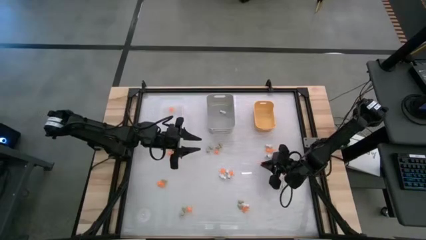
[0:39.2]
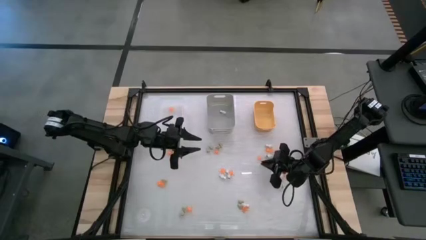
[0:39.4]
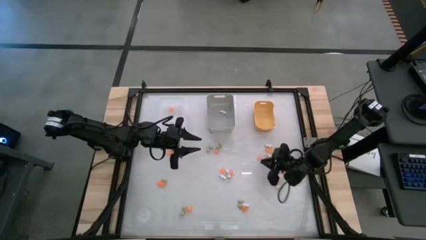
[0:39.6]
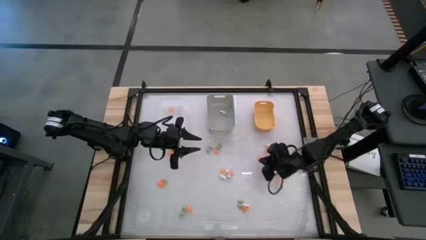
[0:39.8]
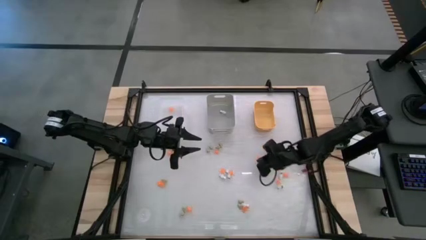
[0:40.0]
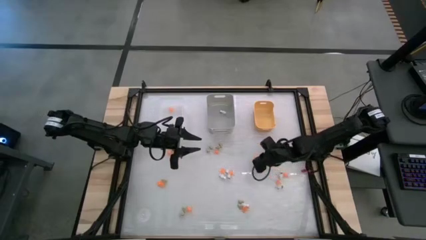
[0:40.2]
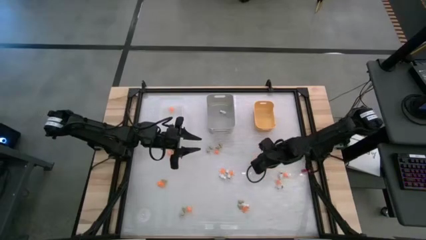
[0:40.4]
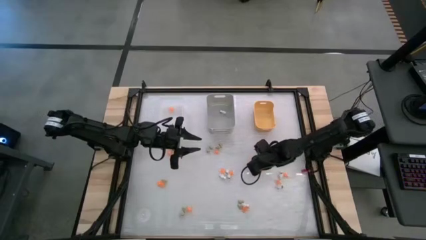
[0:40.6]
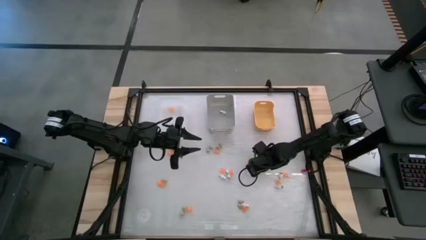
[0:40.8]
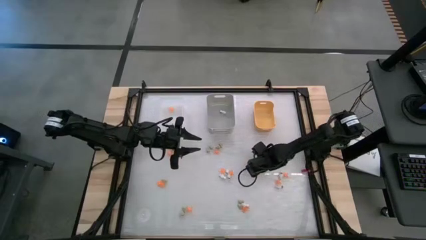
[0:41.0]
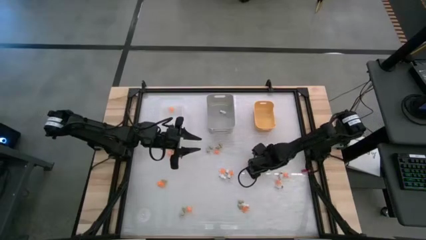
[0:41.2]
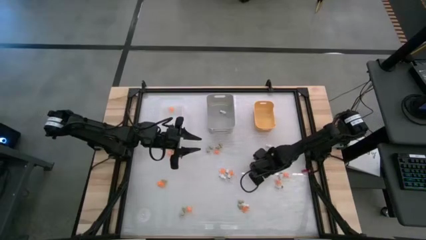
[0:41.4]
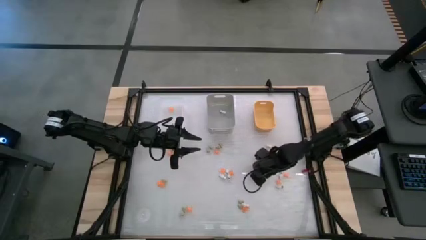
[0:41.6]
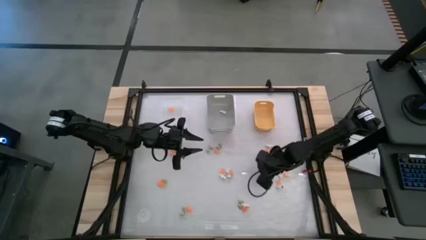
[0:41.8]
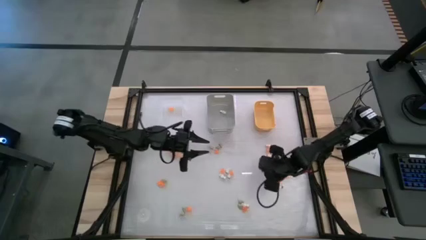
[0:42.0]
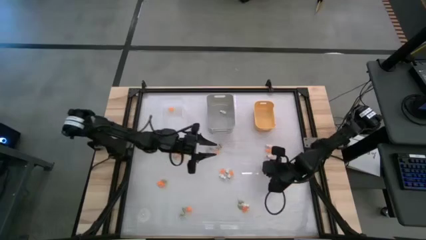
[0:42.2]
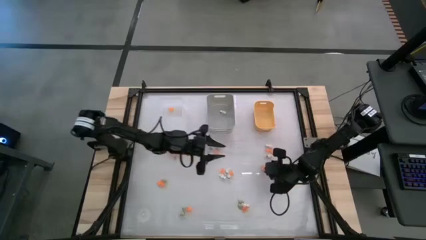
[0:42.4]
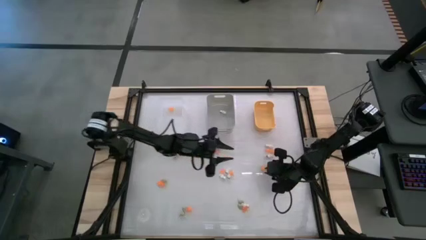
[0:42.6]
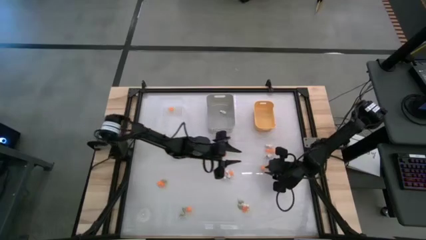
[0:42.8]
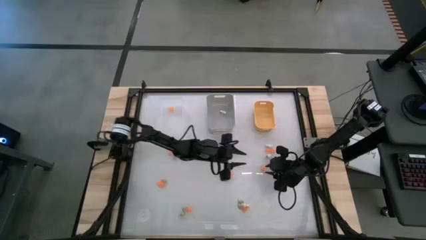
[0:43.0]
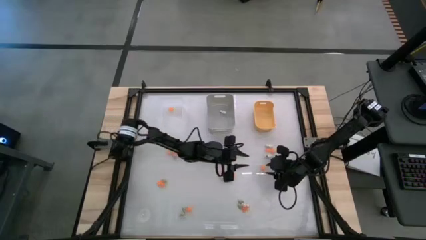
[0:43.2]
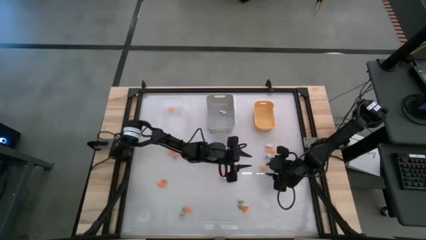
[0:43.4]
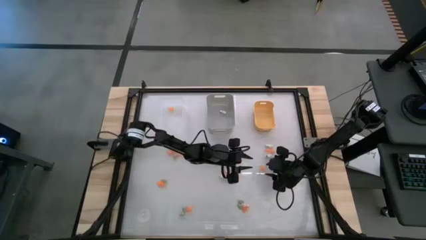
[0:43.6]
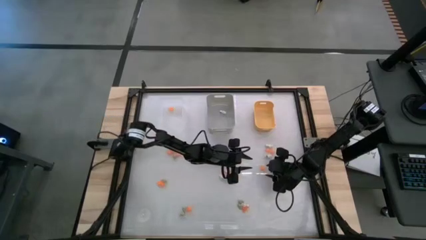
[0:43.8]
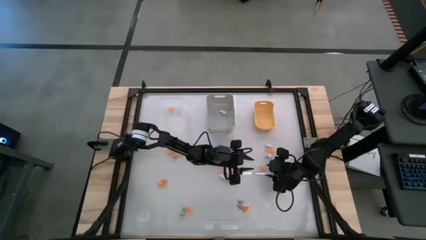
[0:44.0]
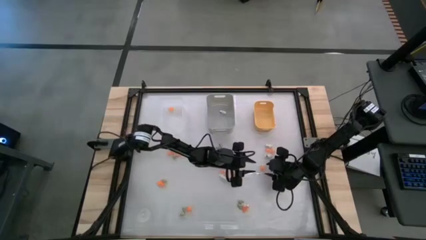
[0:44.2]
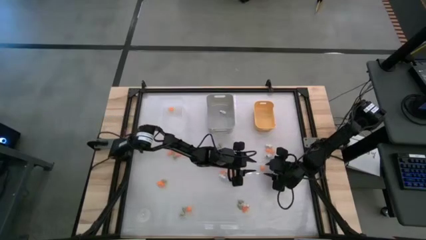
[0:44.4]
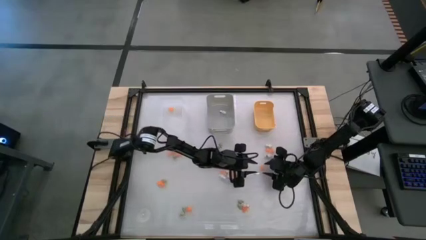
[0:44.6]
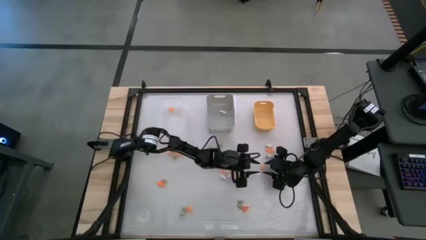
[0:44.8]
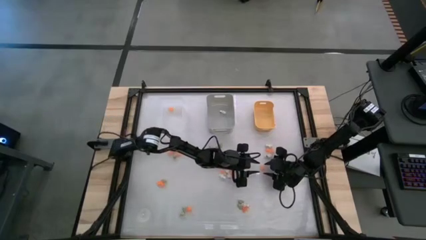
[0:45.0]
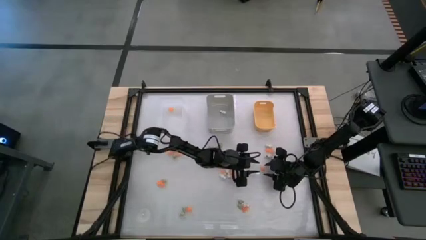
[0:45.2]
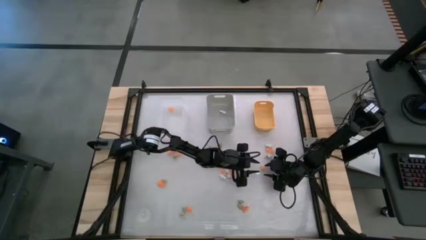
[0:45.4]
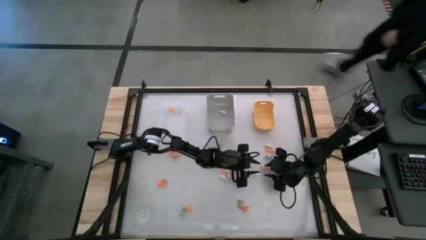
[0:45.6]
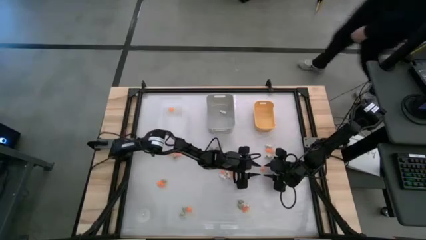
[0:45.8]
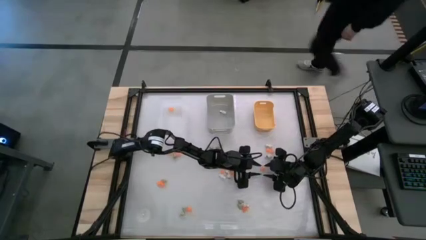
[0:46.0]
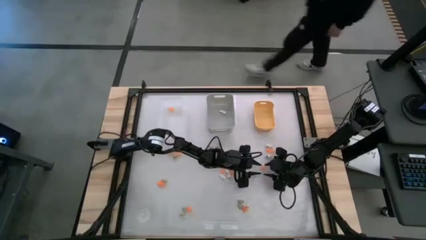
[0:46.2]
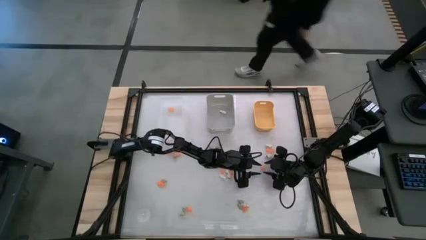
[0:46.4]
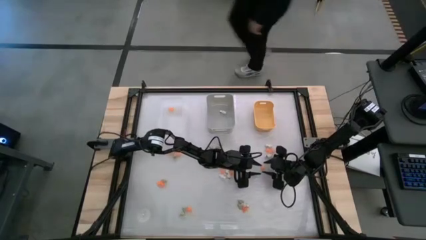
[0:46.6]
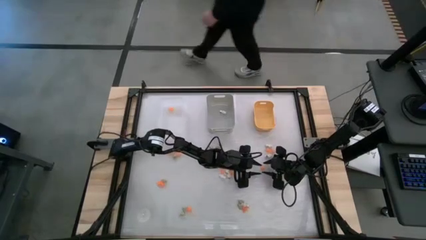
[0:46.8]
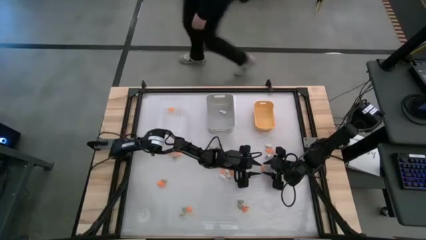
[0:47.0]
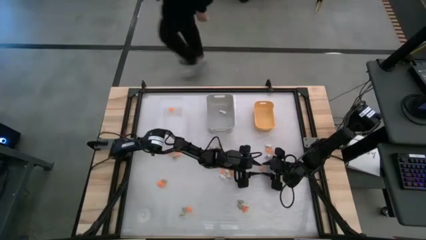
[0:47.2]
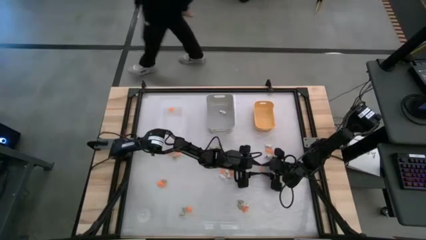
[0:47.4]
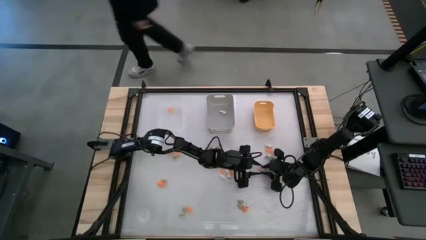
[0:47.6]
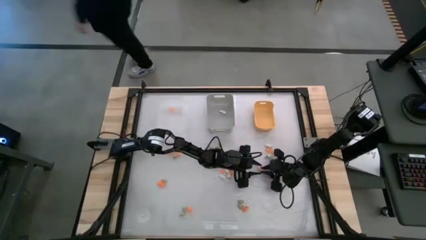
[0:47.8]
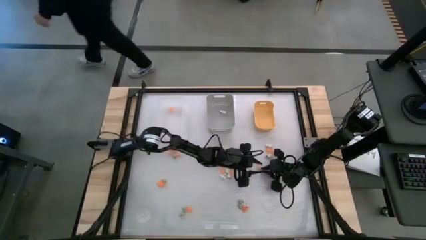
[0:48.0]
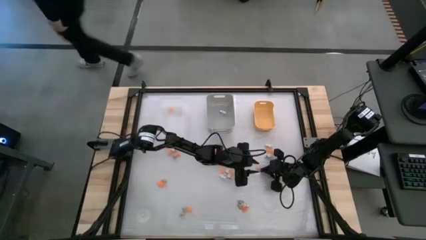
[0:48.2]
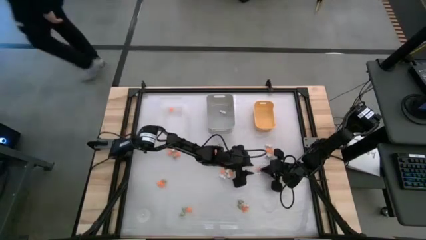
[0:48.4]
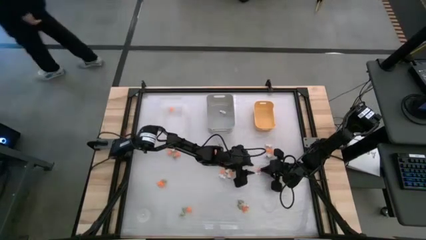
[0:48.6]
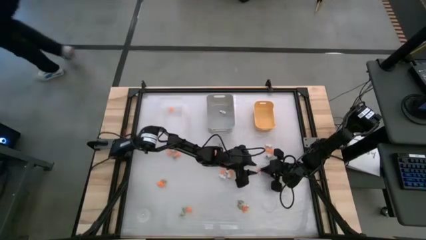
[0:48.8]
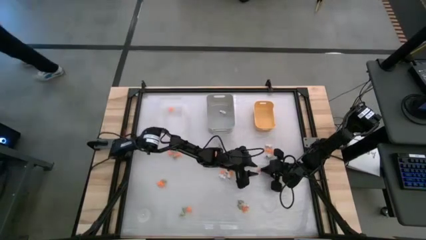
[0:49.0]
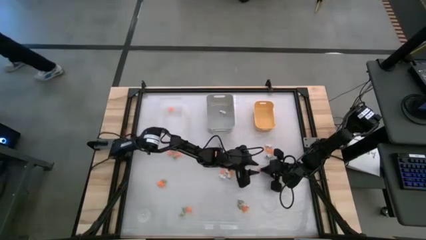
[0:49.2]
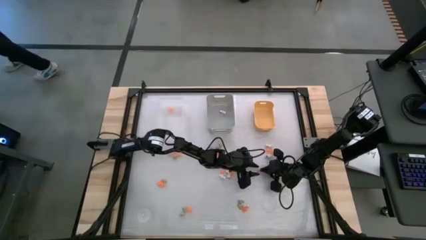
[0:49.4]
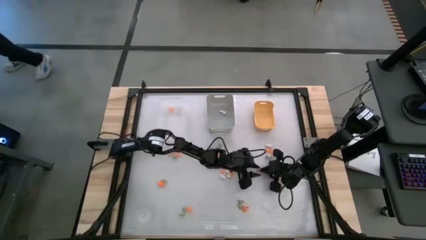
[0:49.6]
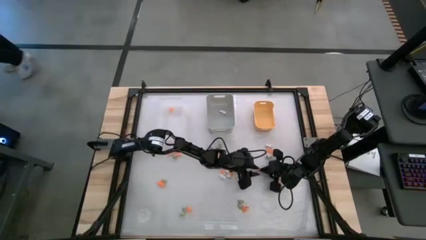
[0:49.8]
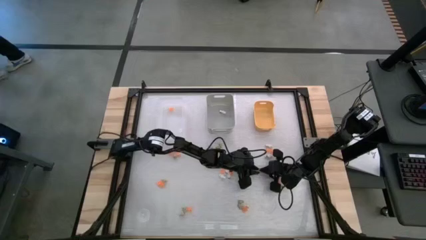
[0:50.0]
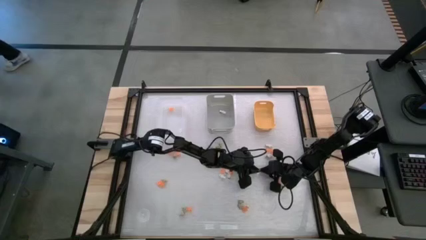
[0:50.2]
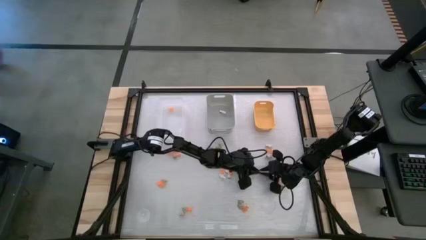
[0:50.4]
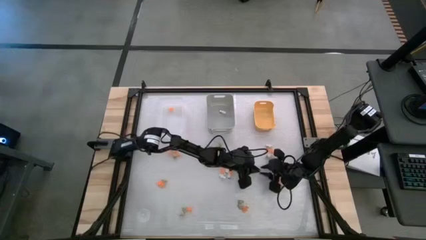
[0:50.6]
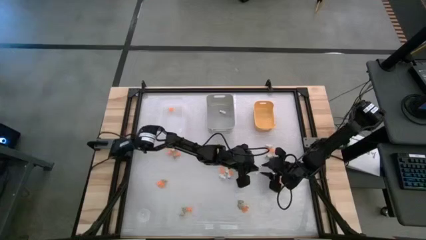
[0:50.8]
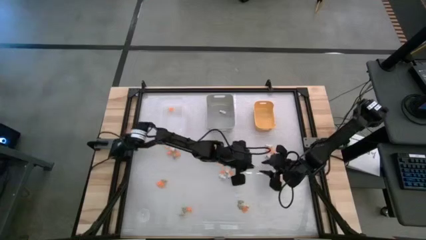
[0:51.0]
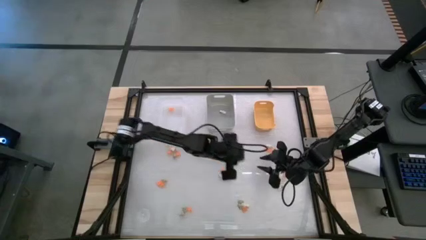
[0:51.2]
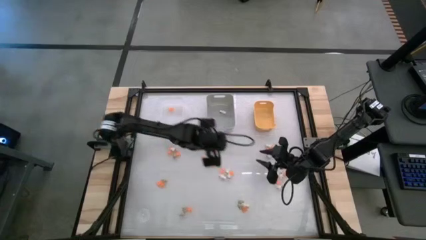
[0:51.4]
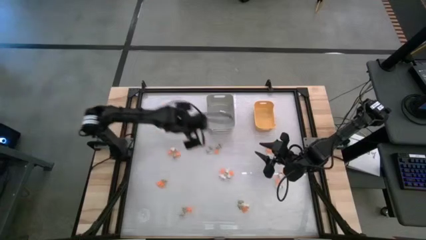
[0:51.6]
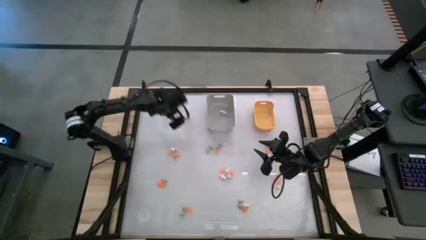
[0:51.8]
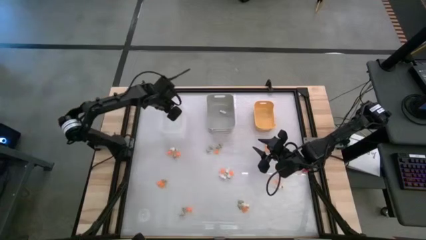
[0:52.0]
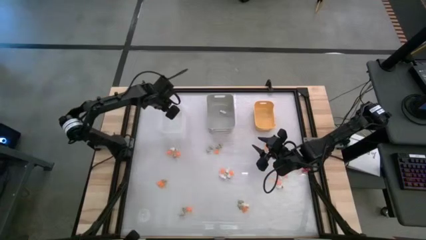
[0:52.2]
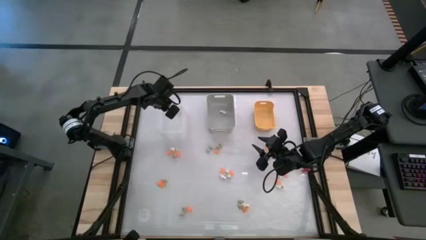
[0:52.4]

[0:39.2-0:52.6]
Task: Sort Halloween decoration
Put the orange spider toy into the transparent white bin

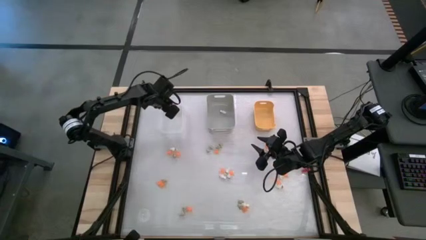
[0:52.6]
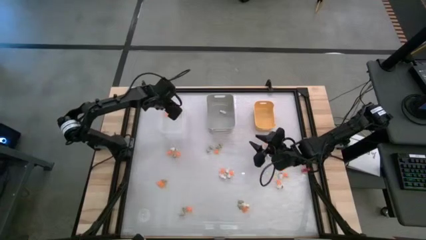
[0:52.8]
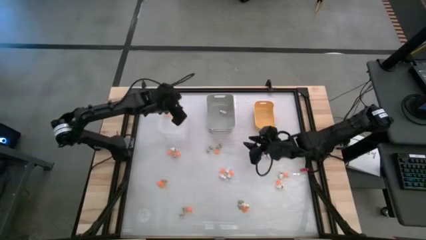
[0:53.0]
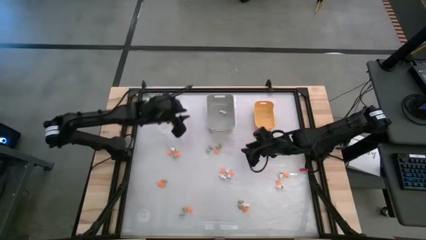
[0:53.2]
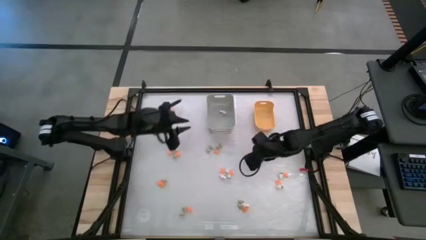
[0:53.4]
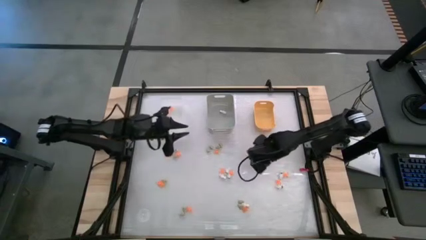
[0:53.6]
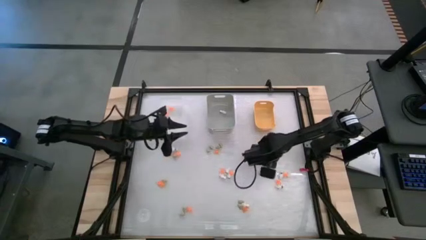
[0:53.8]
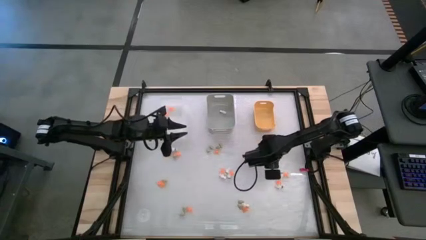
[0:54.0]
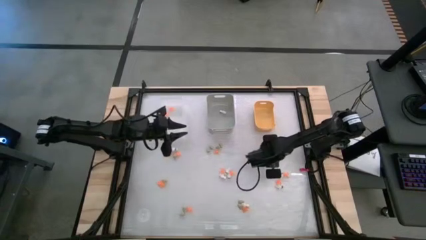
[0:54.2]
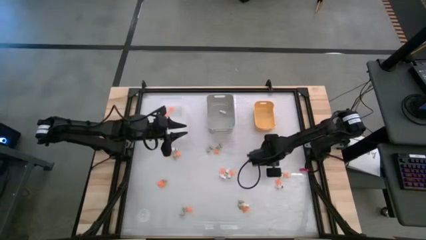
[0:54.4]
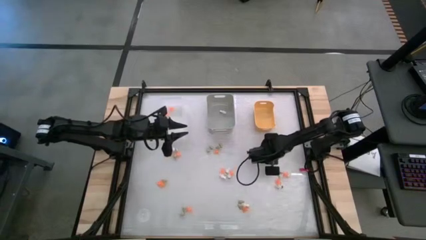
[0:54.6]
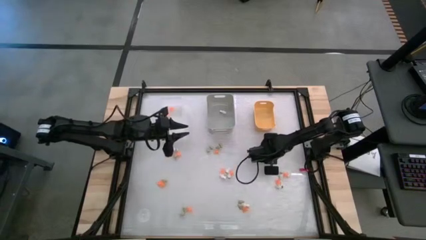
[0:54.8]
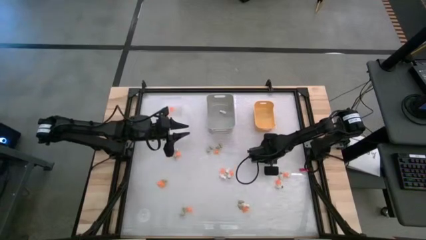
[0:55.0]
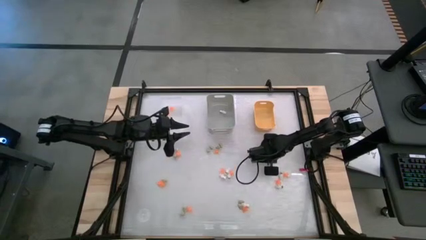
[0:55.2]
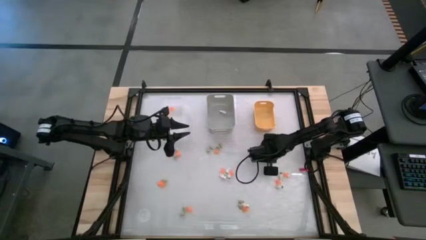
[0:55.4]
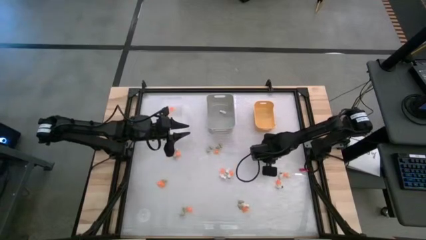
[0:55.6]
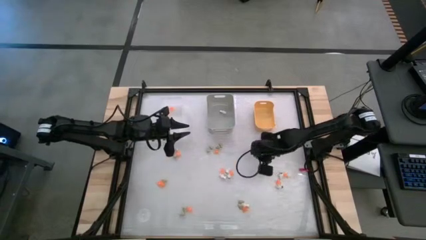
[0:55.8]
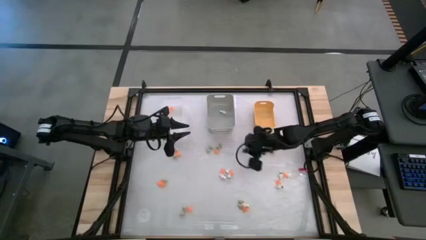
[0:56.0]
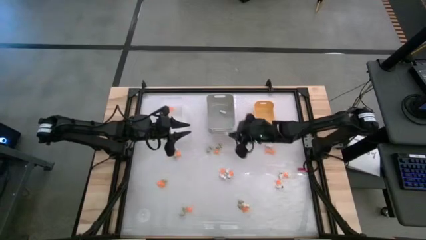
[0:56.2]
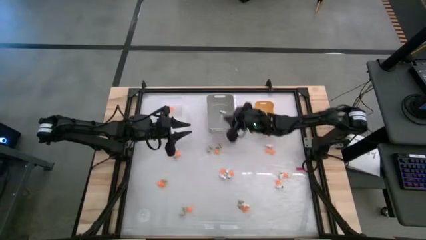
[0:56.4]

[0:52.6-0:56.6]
Put the white skeleton toy into the gray bin
